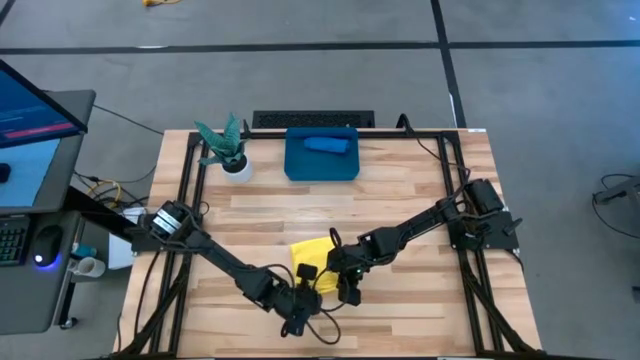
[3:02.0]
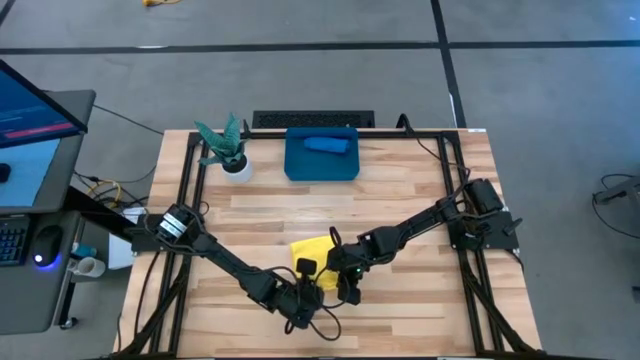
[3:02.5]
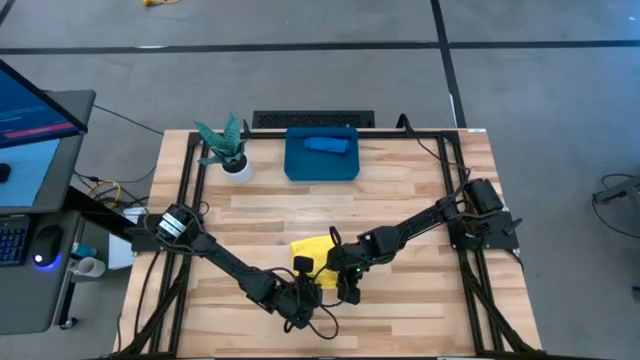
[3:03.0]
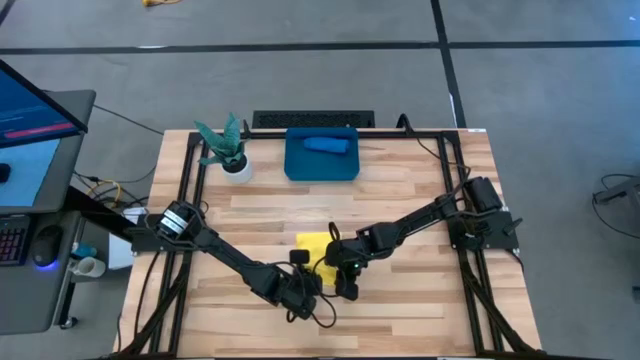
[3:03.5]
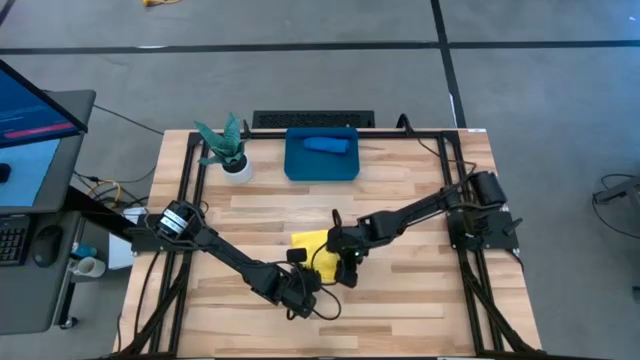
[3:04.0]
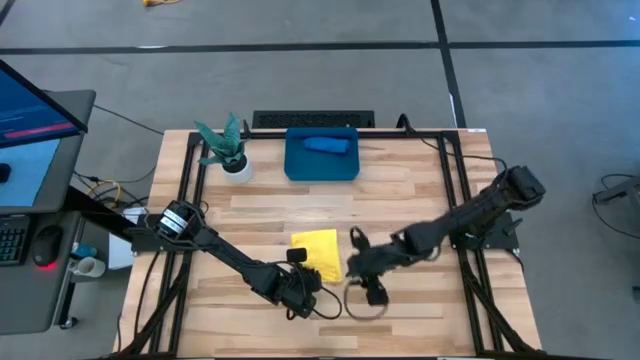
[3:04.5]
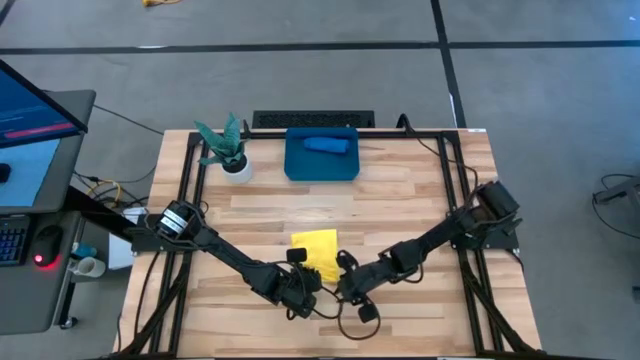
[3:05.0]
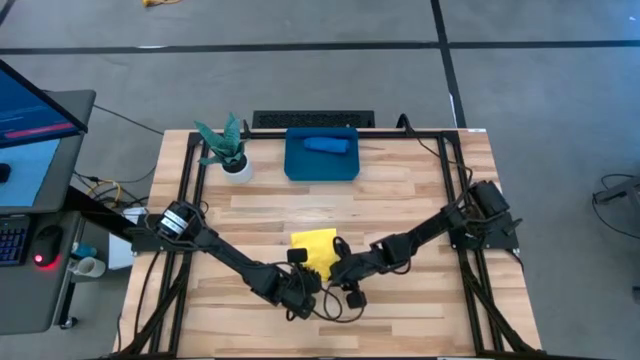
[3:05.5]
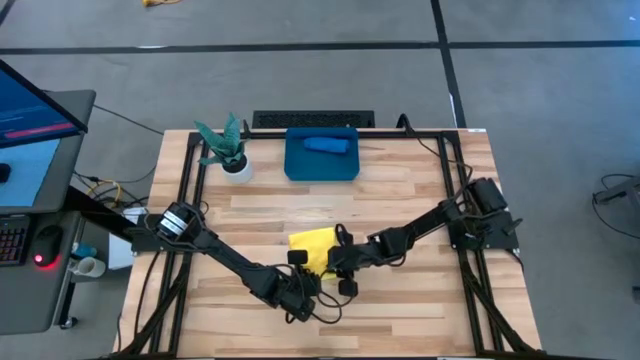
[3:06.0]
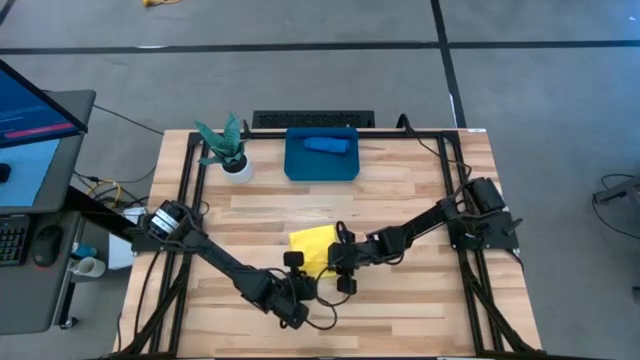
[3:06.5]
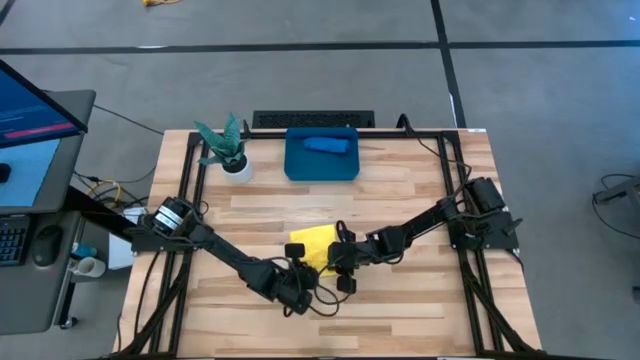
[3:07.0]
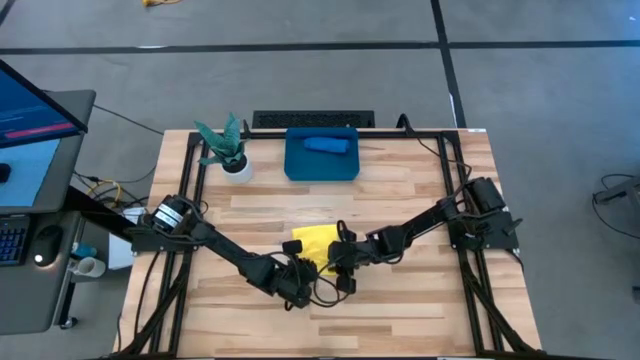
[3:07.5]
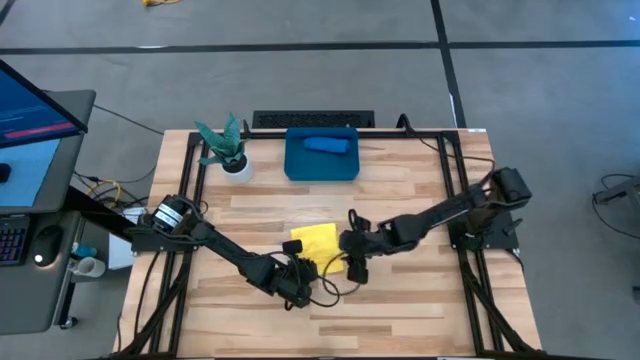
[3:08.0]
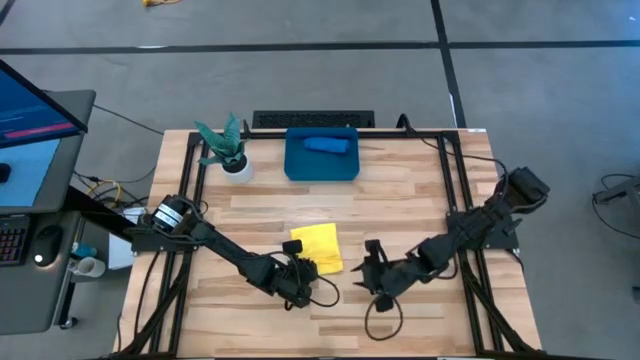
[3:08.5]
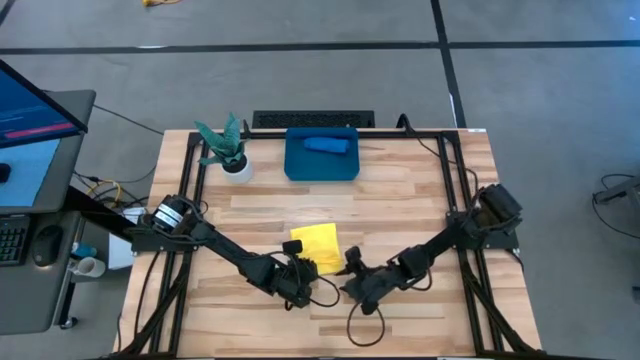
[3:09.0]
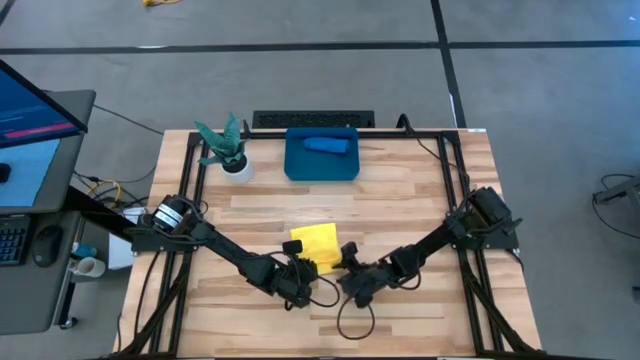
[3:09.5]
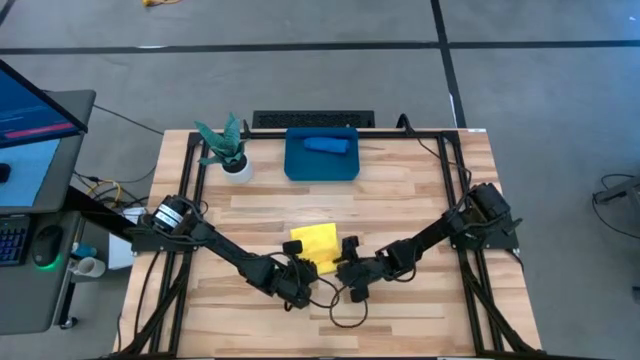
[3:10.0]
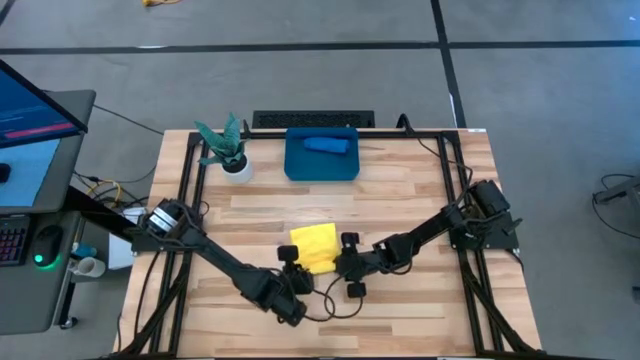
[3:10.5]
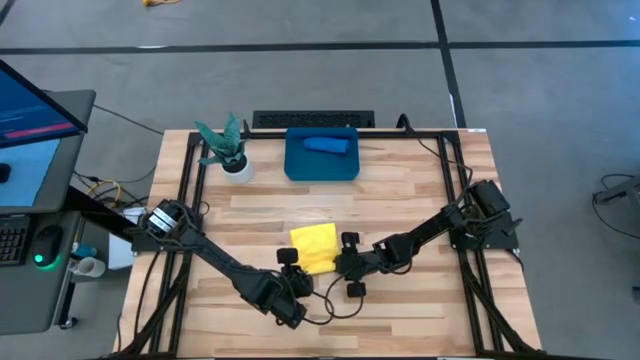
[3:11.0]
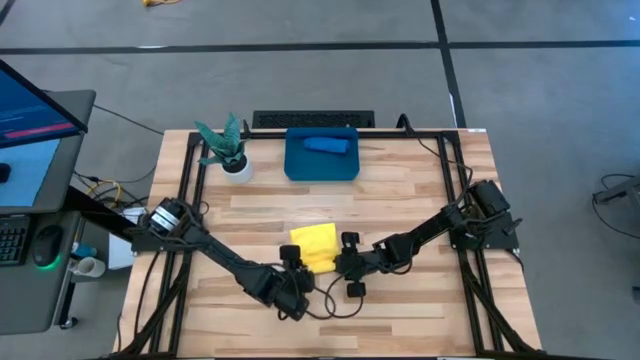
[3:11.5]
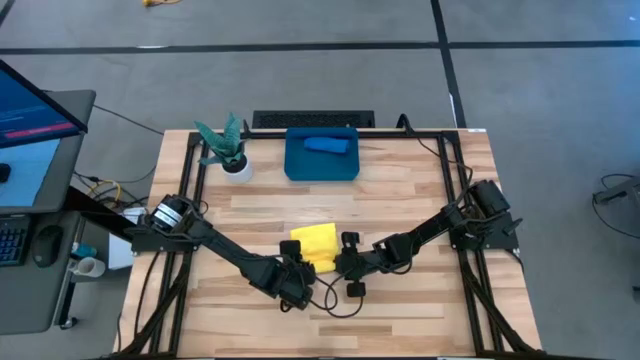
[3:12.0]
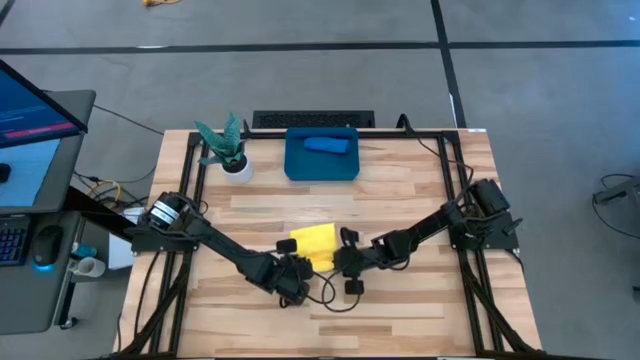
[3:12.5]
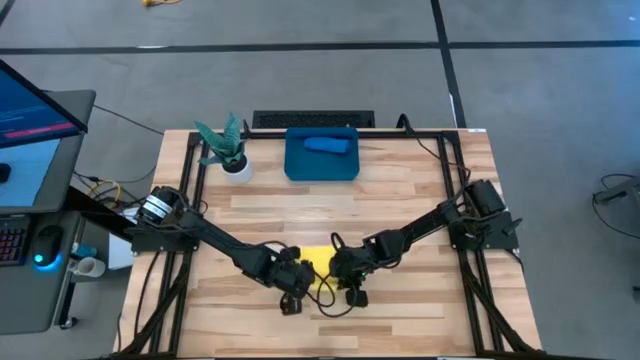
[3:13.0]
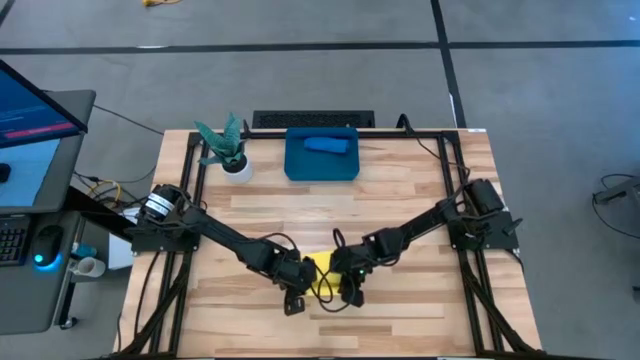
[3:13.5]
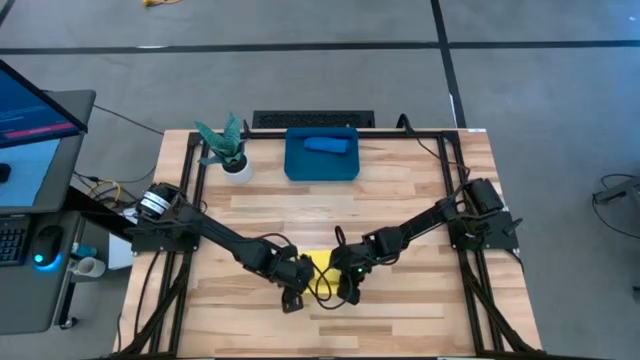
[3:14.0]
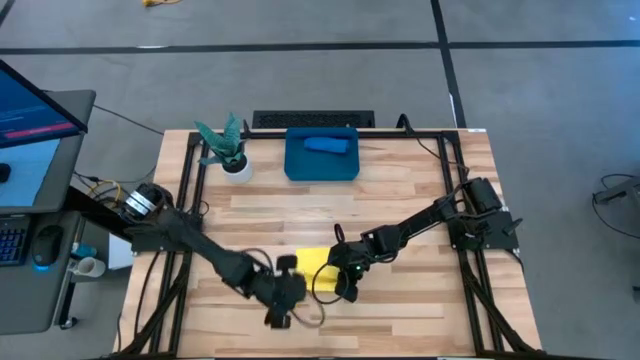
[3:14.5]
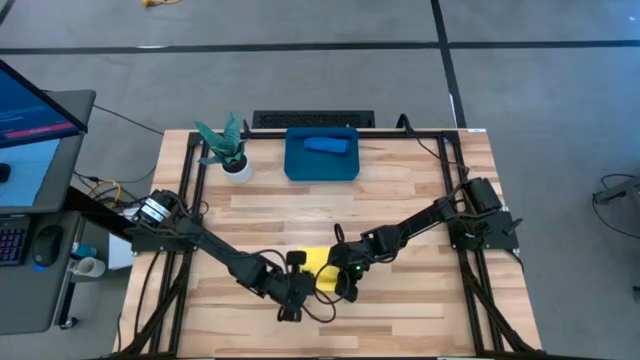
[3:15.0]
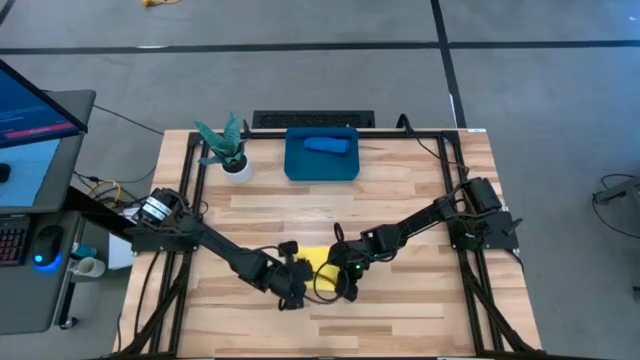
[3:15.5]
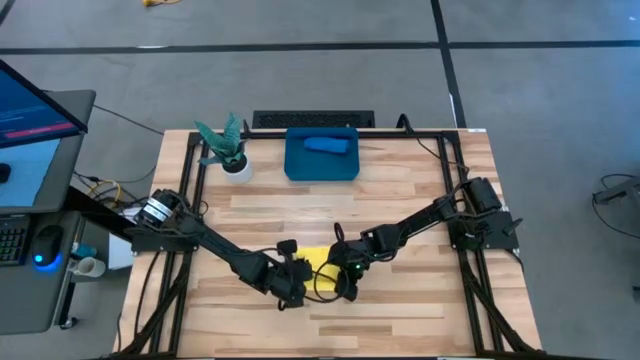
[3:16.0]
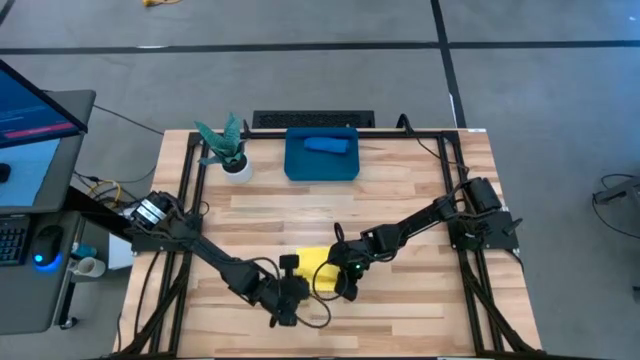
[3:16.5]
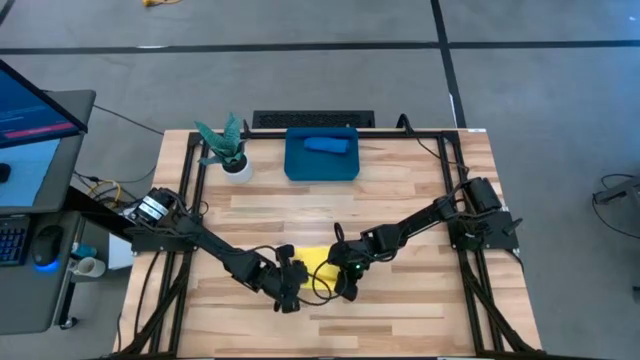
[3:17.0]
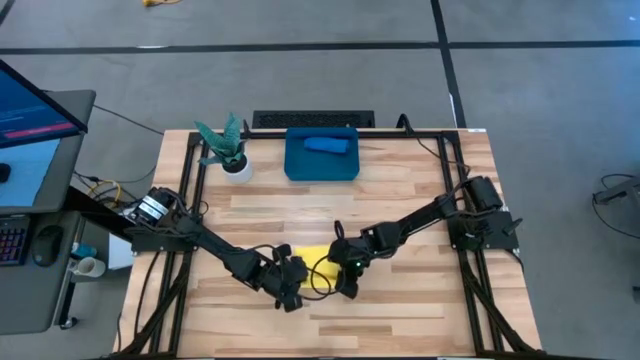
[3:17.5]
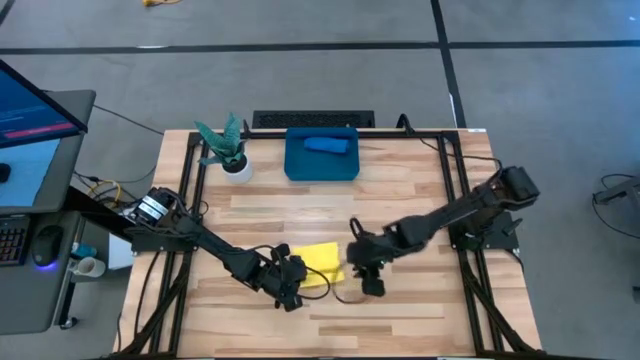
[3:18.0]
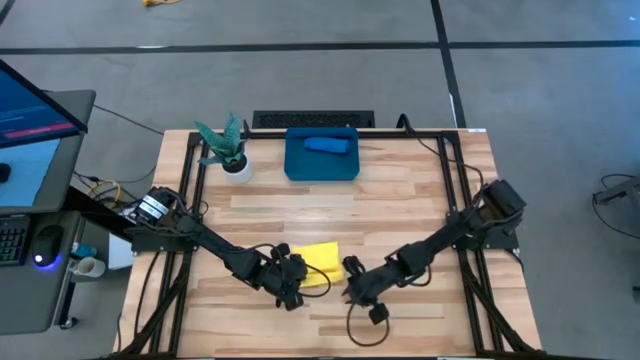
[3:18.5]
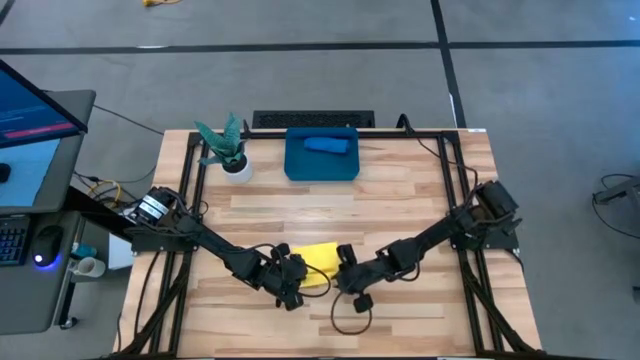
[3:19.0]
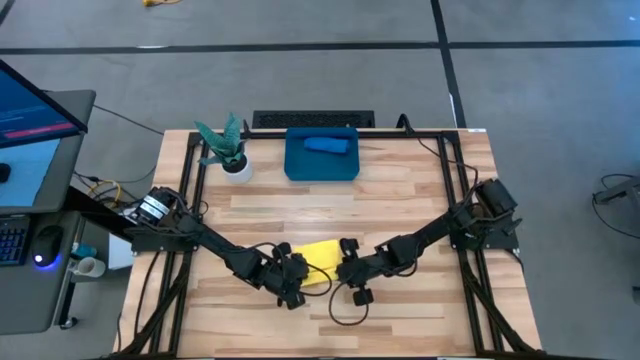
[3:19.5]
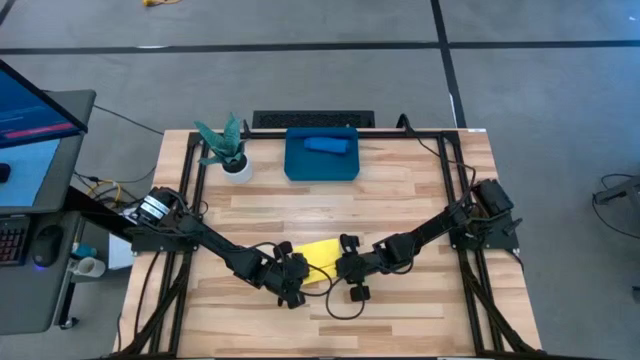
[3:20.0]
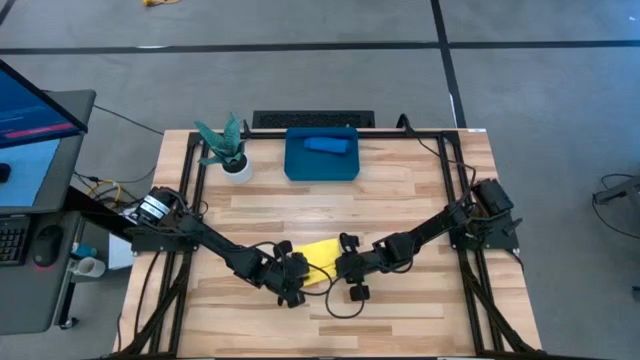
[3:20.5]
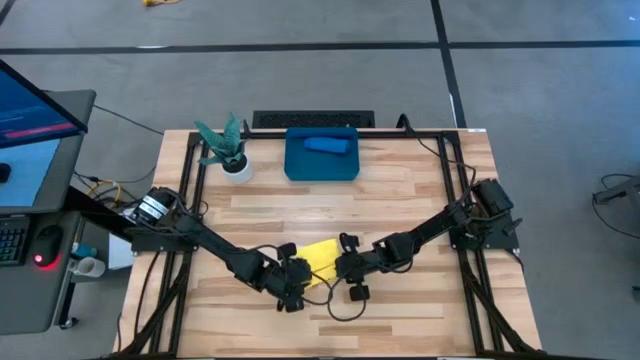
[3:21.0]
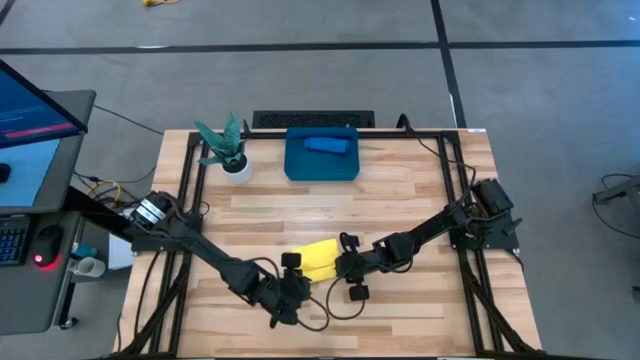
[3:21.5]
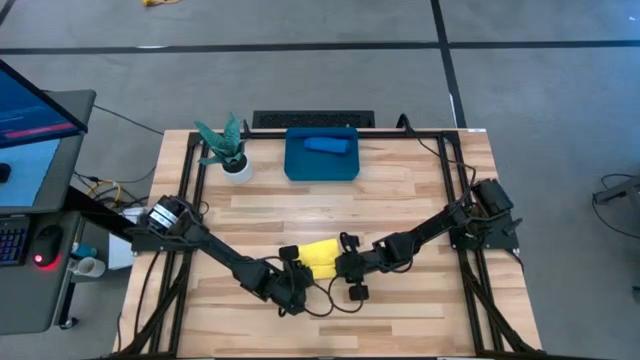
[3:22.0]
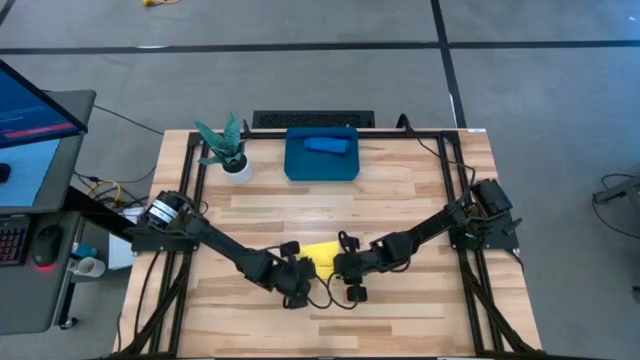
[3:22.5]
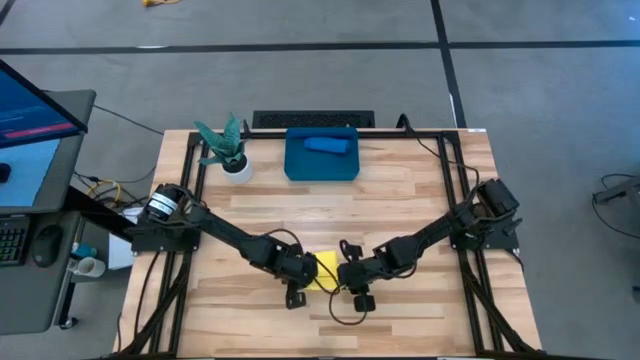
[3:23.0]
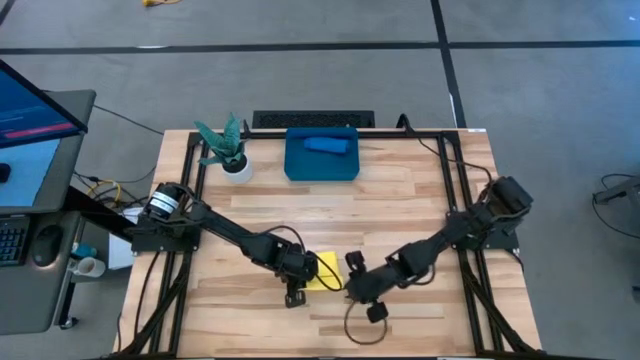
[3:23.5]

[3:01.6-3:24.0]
Task: Roll microfiber towels into tight, uniform cylinder then place into a basket
Roll the yellow microfiber towel
